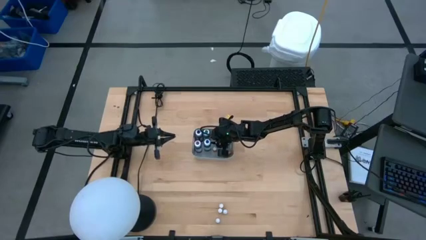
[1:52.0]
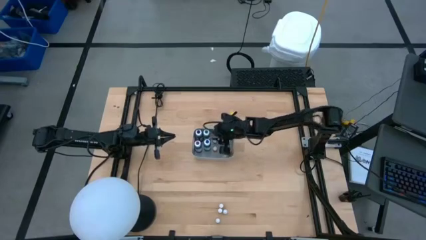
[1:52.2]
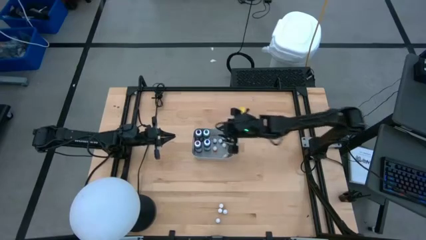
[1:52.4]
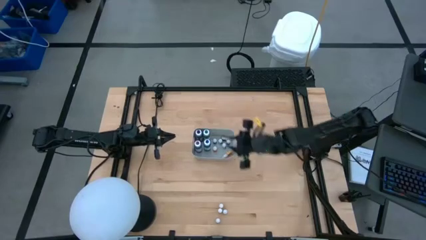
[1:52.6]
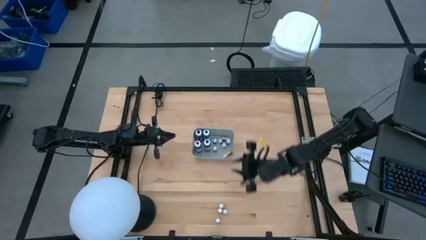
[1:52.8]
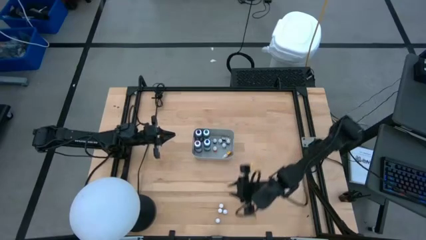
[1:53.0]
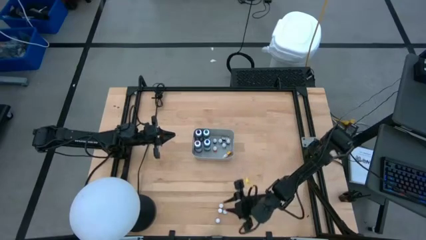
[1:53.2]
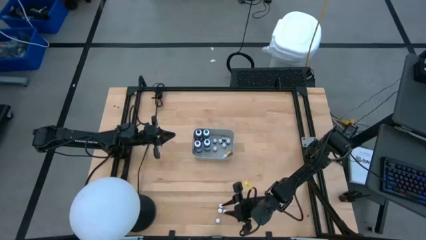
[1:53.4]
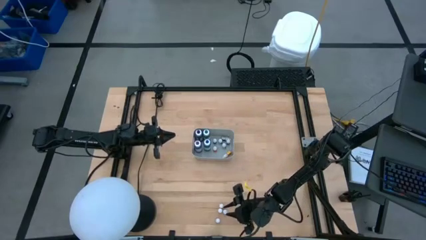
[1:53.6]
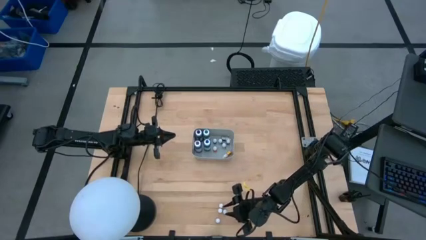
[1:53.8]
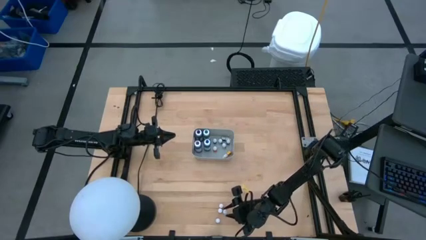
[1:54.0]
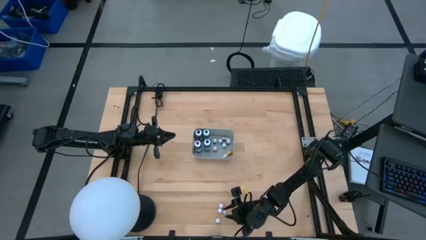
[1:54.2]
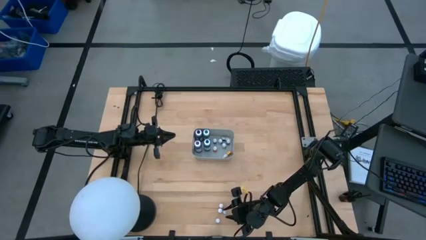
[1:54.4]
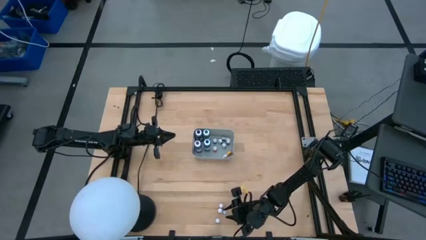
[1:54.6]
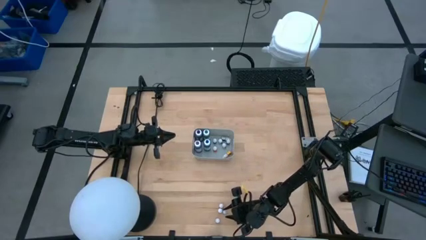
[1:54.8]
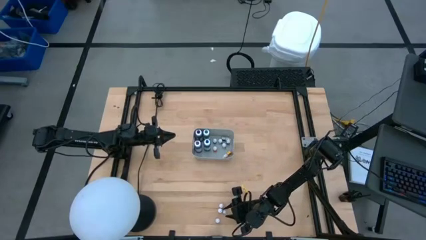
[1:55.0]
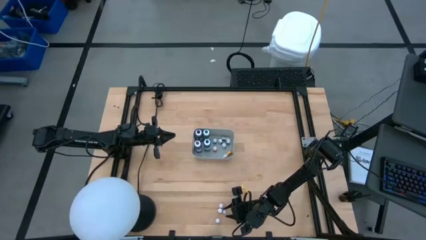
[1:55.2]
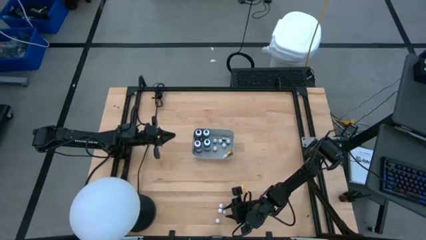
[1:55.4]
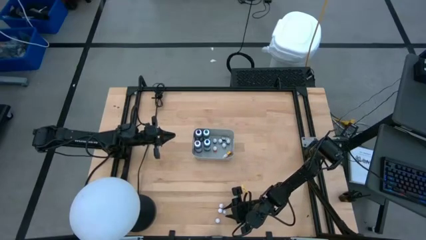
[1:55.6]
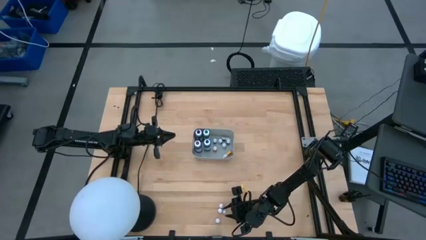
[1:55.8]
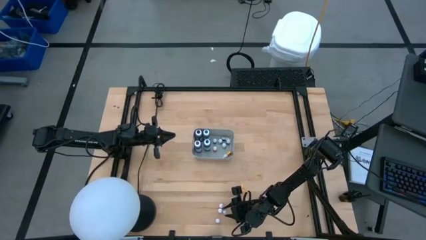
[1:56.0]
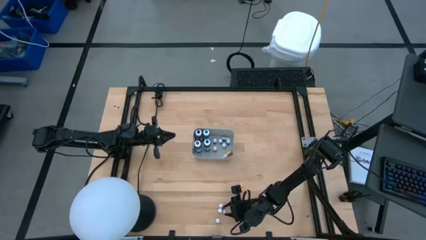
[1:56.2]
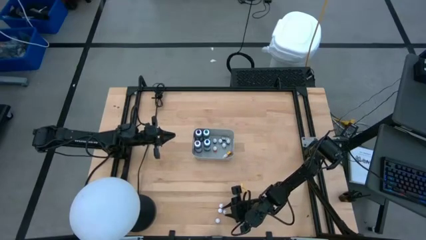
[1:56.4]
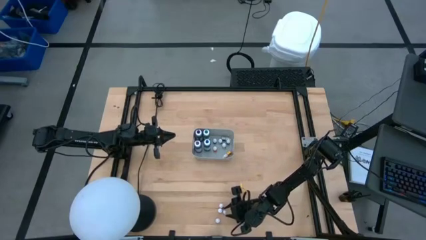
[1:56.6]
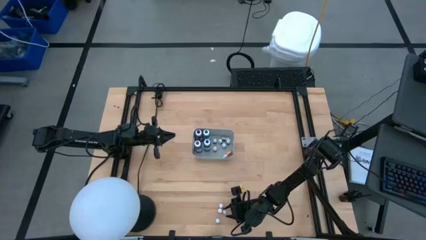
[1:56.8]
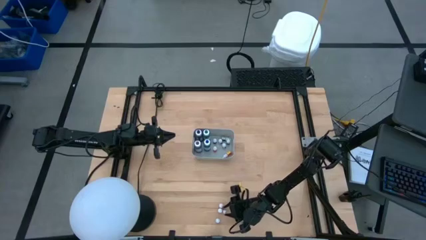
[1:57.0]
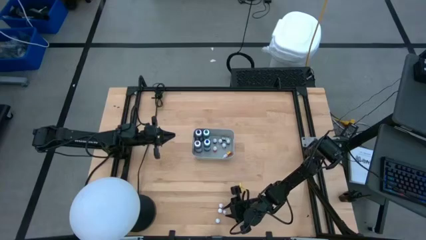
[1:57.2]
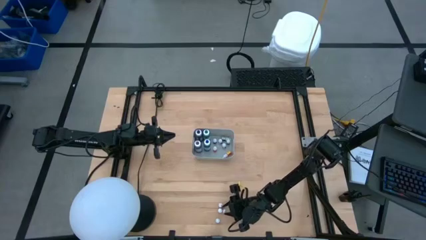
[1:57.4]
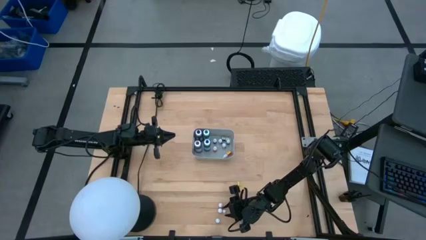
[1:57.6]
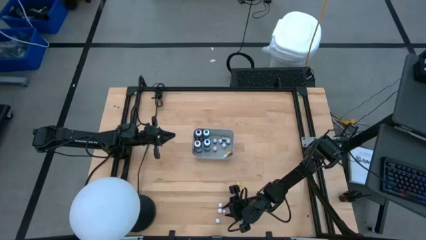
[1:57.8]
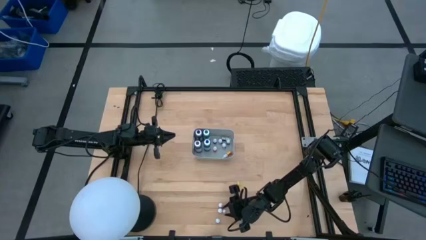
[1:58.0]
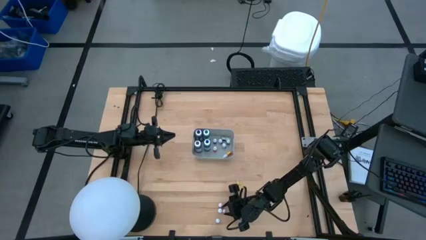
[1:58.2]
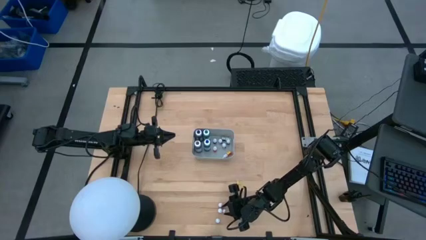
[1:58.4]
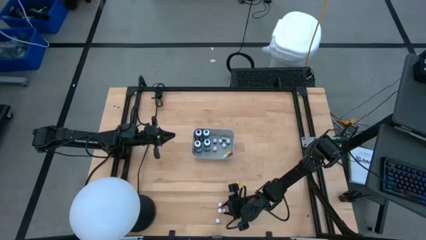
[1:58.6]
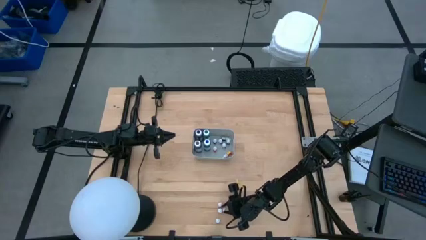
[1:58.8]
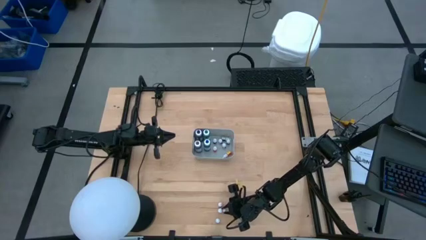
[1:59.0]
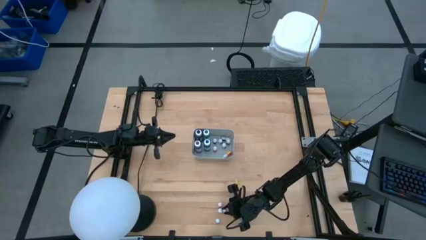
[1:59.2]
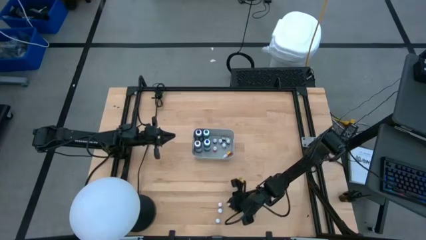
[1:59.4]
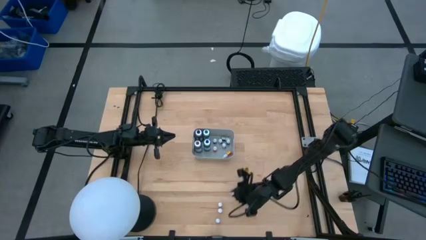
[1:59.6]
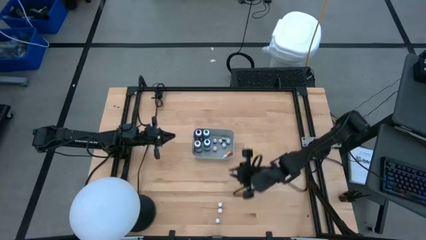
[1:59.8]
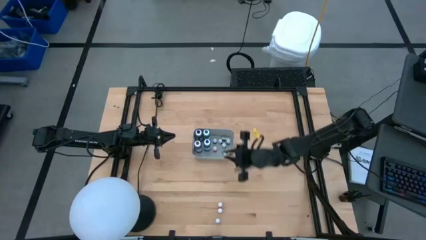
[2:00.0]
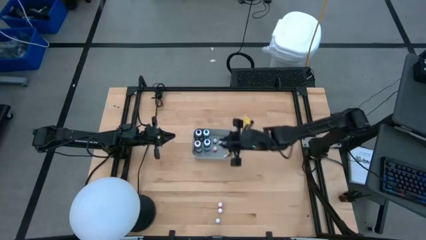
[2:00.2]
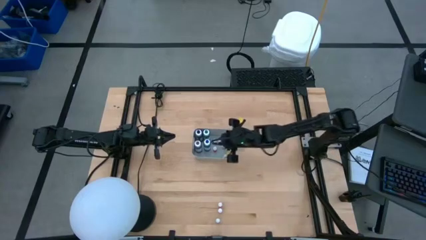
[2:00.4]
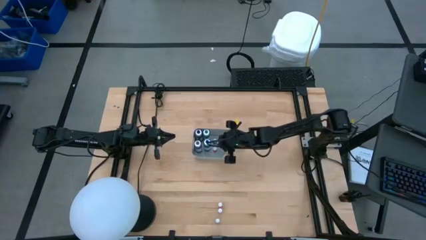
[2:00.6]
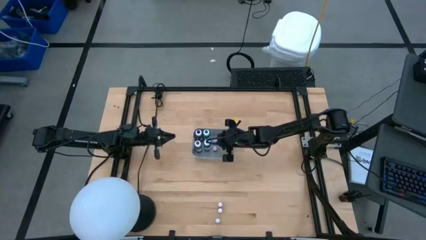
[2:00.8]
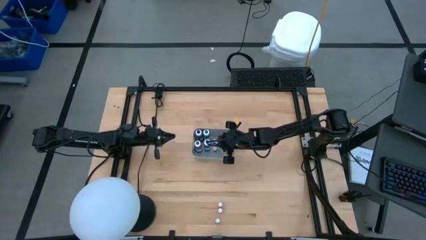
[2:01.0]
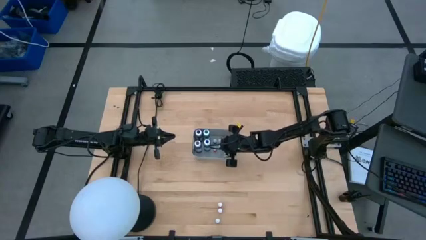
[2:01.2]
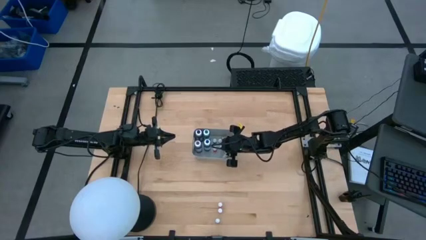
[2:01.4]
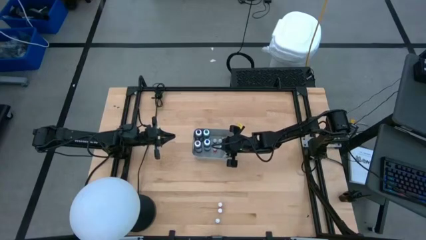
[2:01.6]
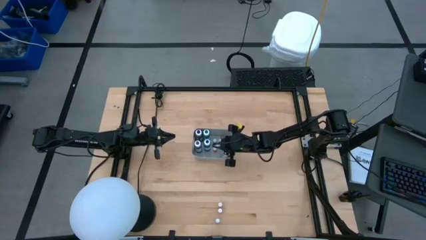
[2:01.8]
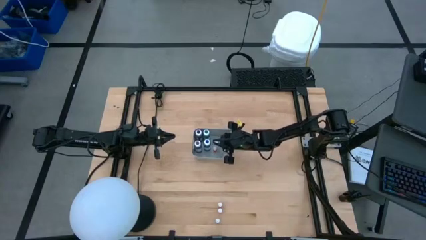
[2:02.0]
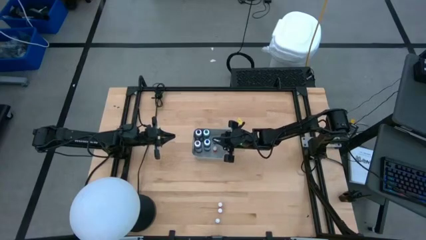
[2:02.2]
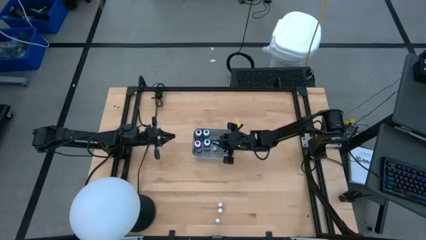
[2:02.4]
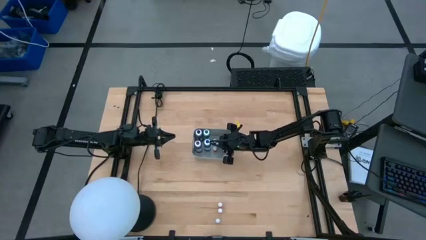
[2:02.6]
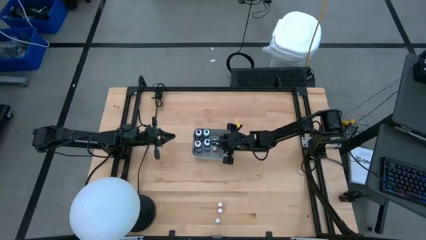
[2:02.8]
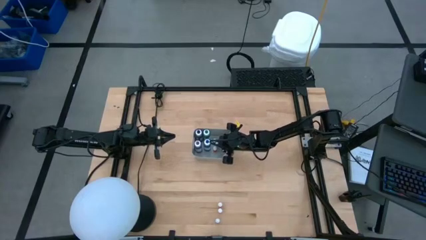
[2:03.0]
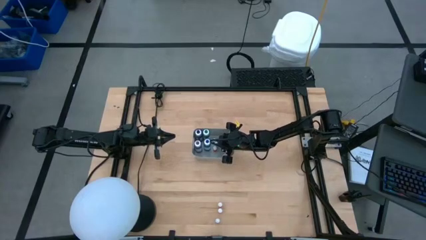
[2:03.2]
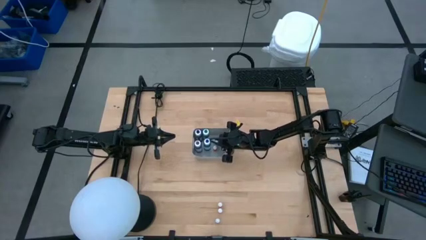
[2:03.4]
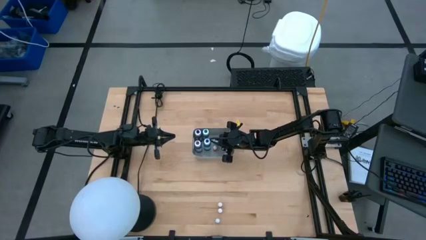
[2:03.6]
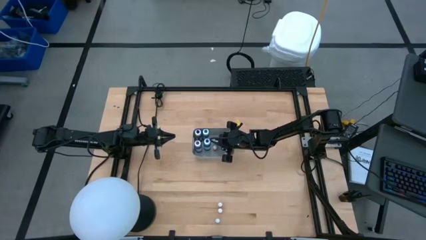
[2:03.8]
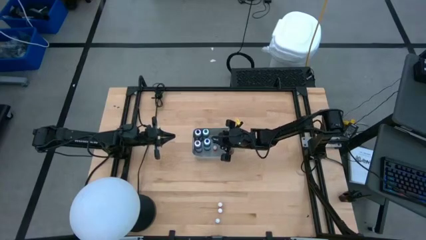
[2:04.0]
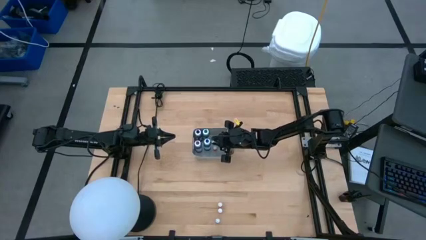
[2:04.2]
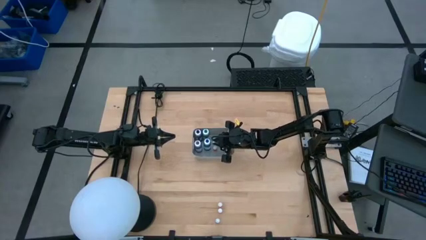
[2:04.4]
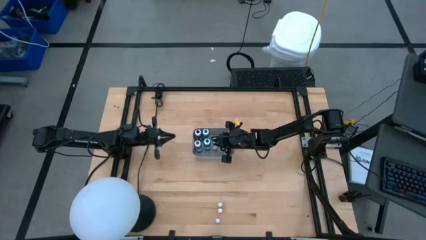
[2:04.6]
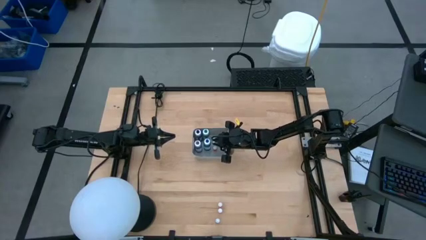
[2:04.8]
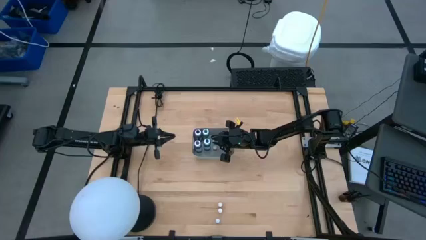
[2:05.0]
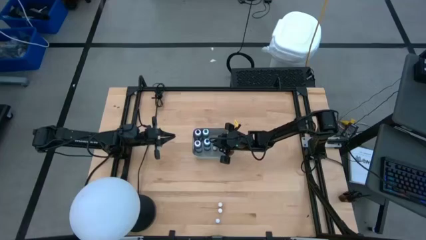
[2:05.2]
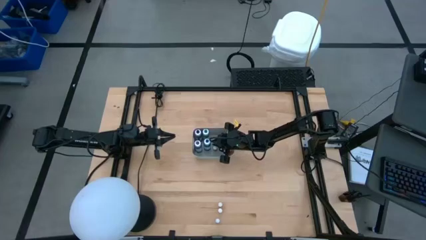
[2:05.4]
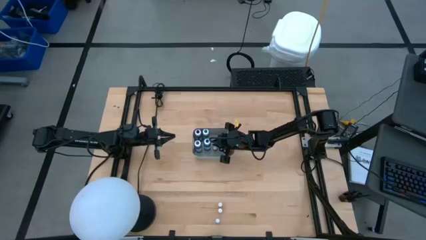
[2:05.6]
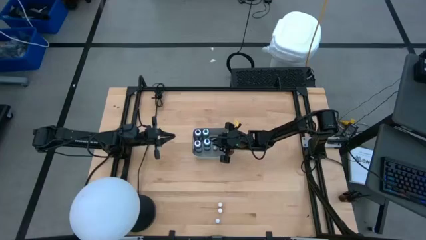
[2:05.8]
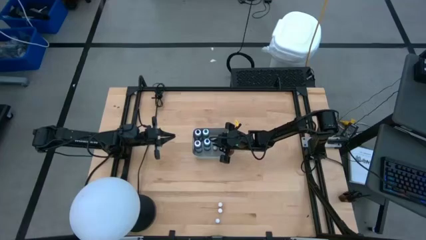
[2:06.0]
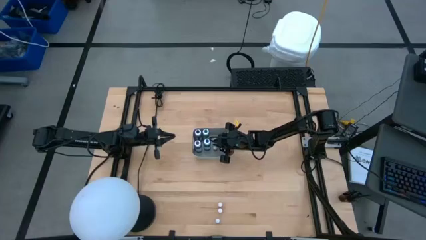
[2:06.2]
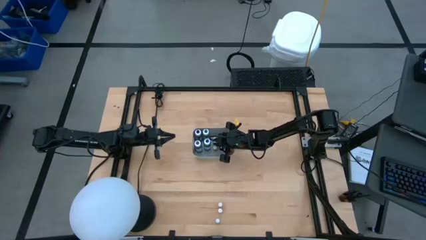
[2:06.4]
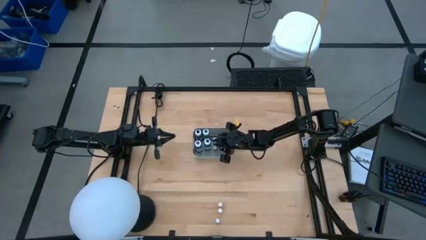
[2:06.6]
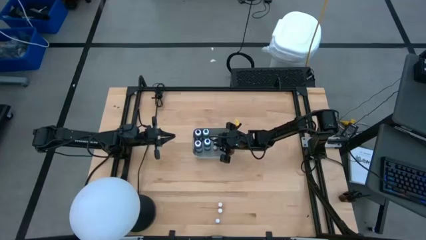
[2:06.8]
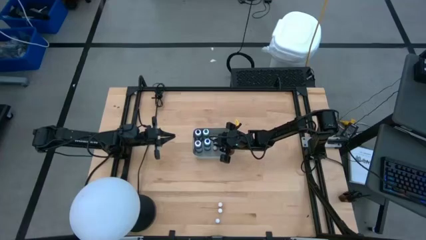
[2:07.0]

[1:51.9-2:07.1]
Task: Pick & Place food coloring
Put the small black food coloring bottle into the gray bin

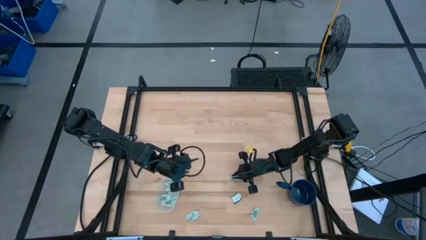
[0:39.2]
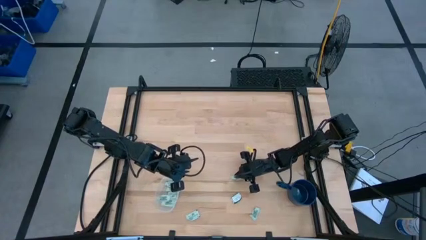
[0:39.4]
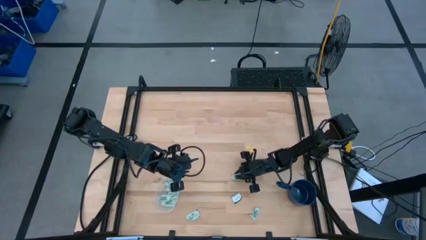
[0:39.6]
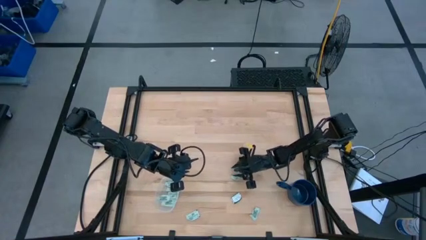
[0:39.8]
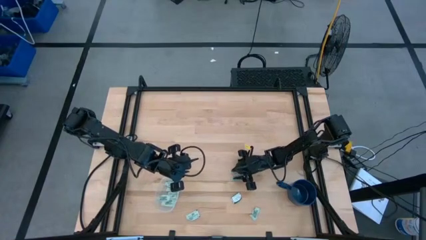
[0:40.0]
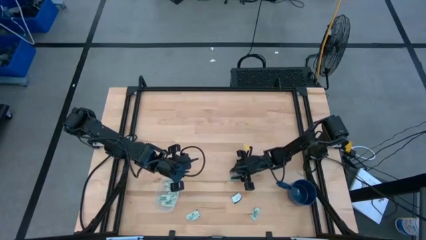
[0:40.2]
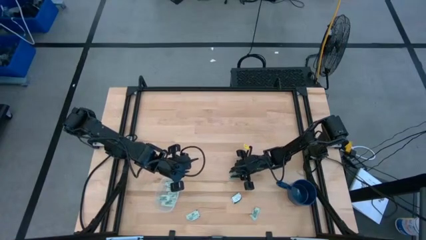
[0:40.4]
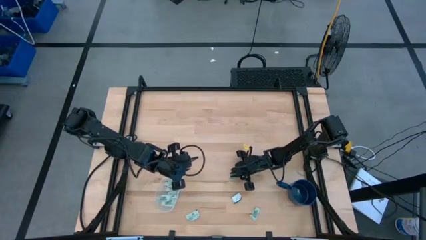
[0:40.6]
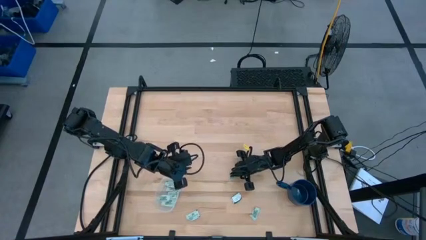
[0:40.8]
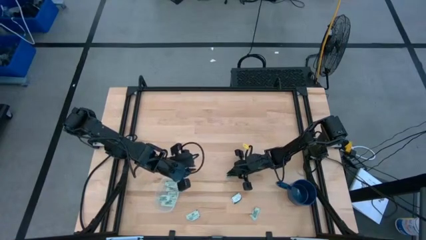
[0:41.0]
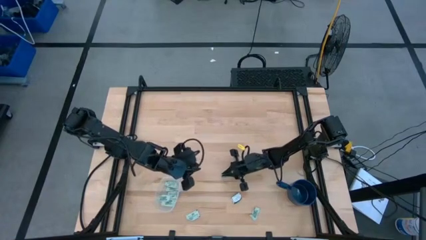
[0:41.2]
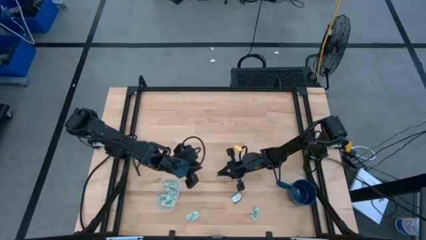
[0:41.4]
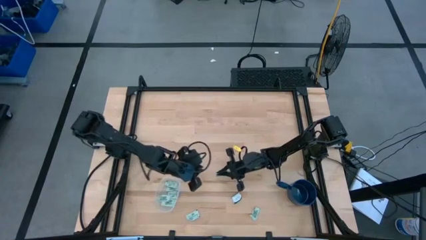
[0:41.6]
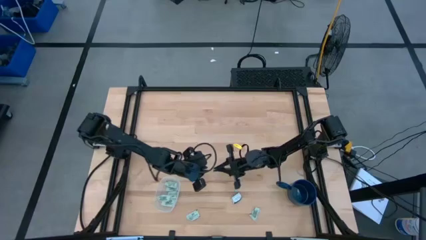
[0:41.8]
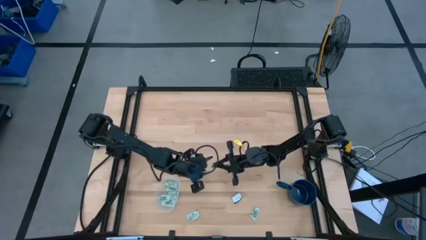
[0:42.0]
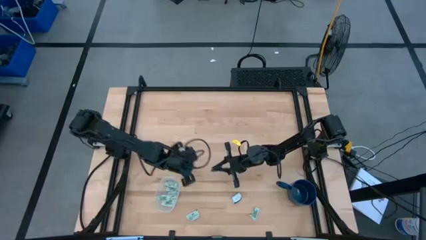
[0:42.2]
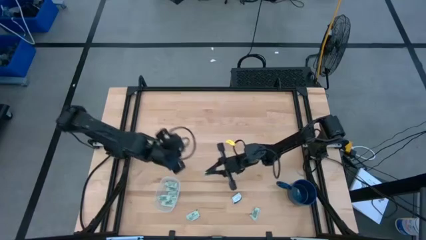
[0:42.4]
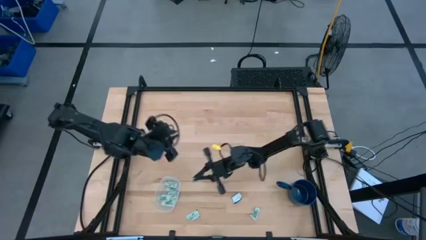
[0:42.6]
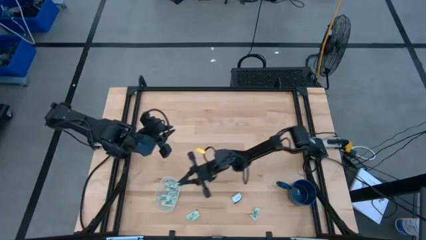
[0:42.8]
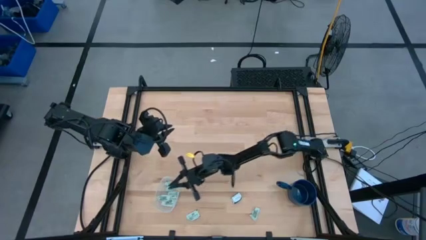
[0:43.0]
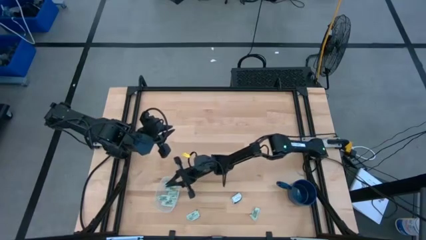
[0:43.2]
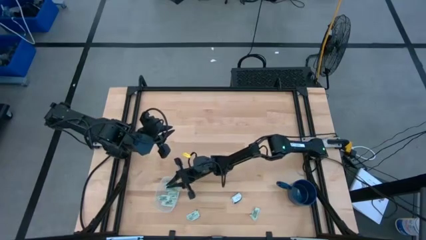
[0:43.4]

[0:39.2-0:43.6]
Task: Pick and place Stevia / Truvia into bins
Put the stevia packet into the transparent container
